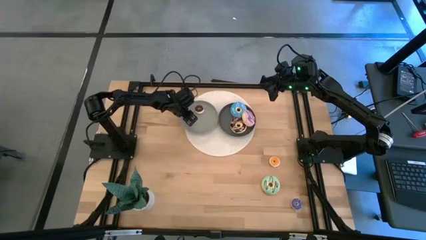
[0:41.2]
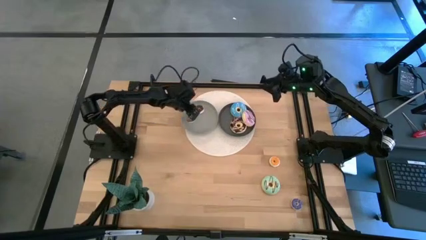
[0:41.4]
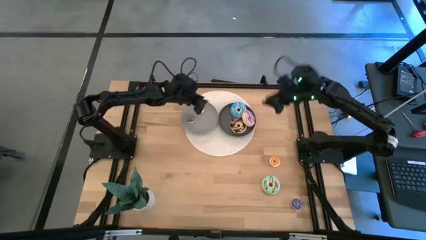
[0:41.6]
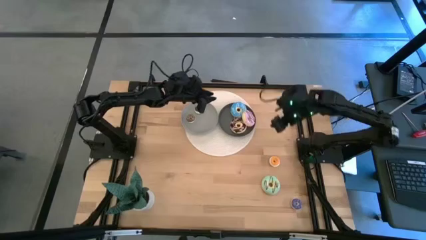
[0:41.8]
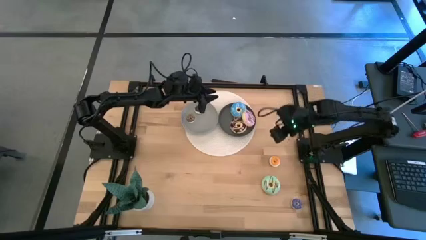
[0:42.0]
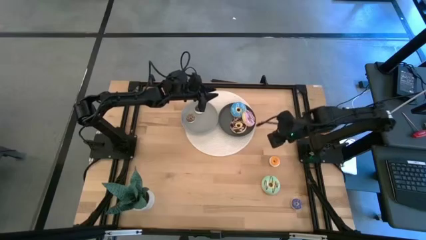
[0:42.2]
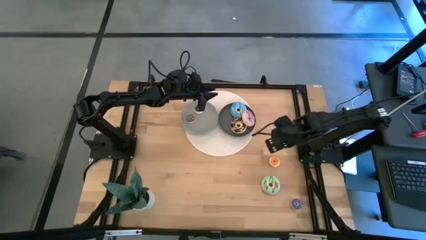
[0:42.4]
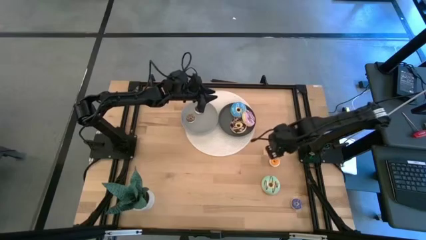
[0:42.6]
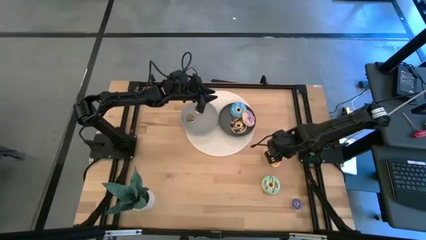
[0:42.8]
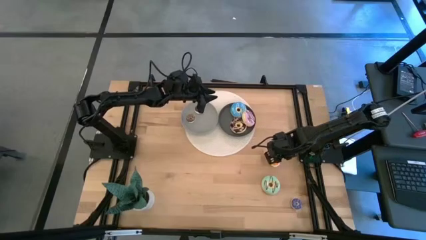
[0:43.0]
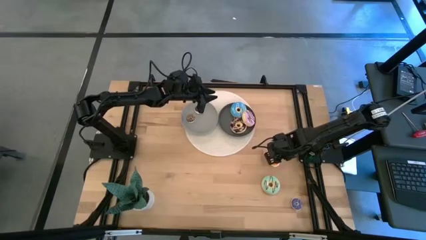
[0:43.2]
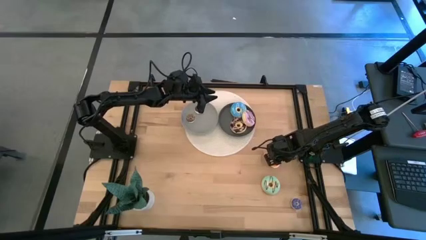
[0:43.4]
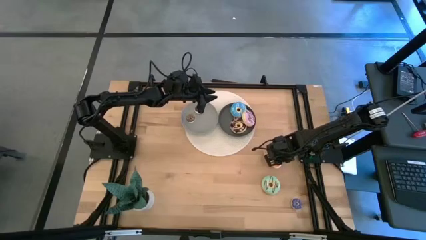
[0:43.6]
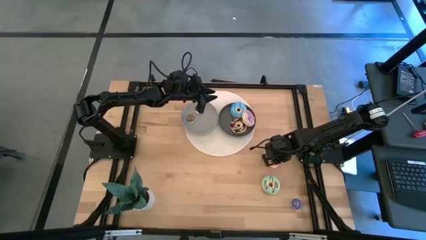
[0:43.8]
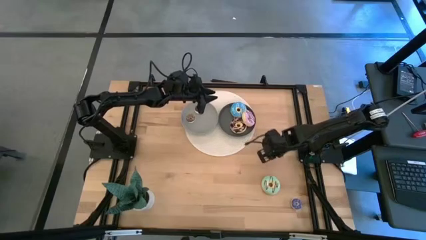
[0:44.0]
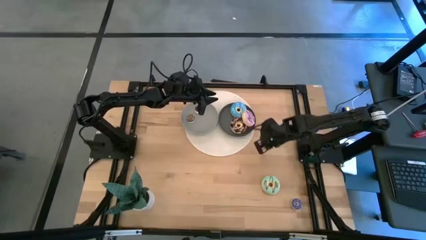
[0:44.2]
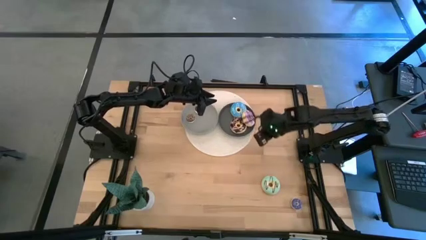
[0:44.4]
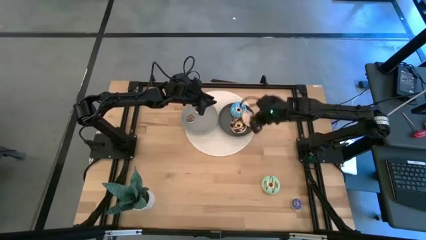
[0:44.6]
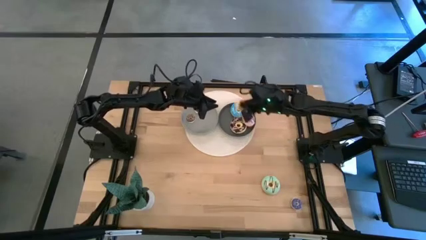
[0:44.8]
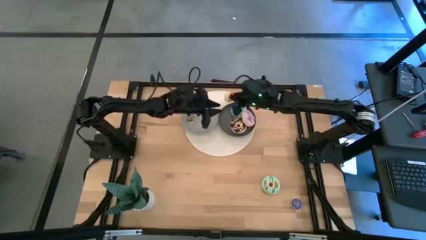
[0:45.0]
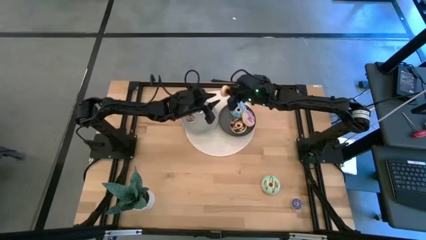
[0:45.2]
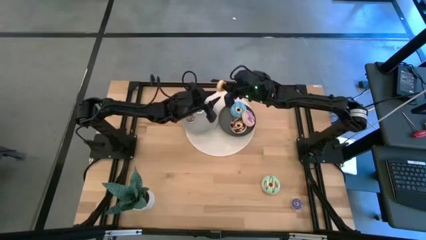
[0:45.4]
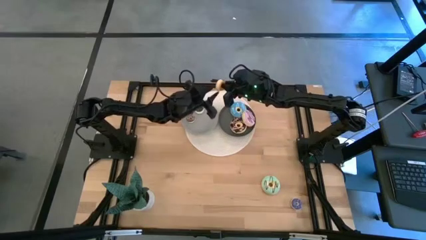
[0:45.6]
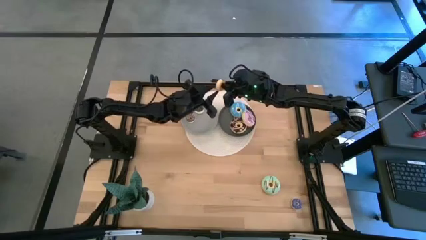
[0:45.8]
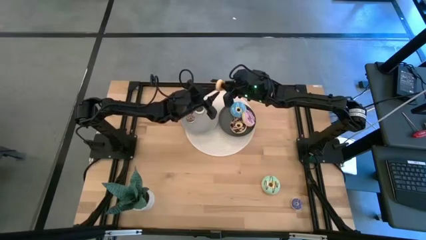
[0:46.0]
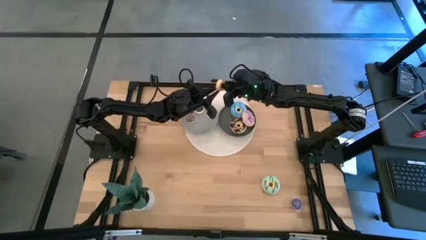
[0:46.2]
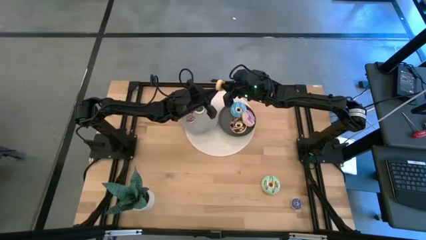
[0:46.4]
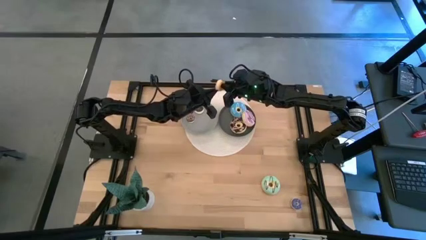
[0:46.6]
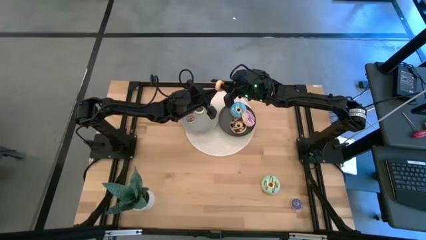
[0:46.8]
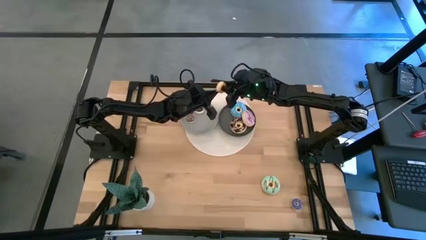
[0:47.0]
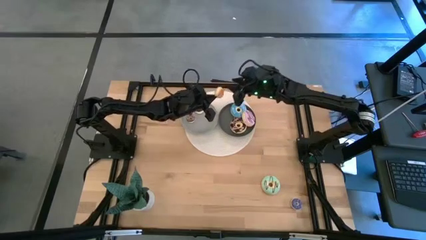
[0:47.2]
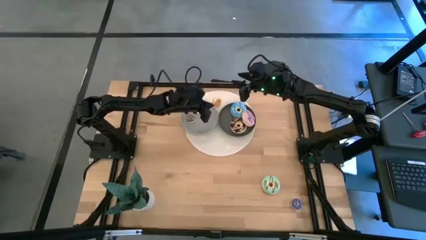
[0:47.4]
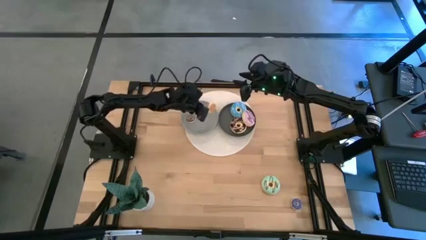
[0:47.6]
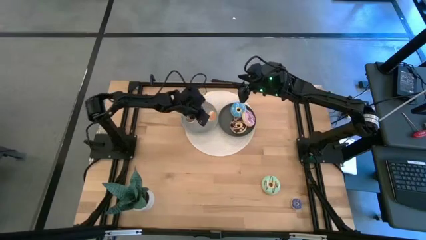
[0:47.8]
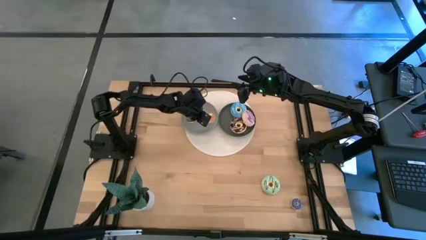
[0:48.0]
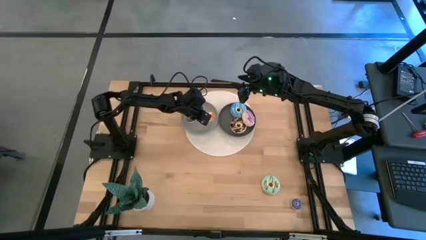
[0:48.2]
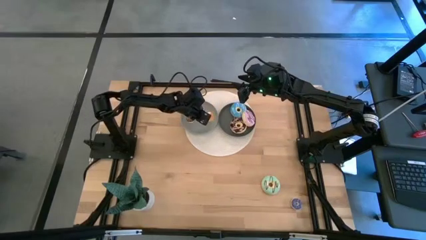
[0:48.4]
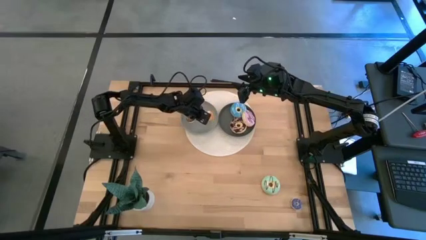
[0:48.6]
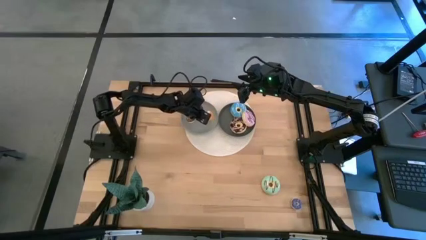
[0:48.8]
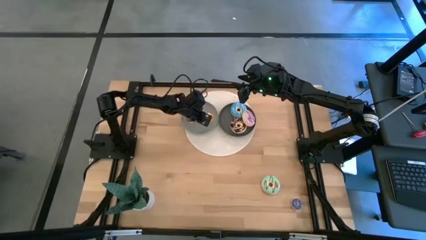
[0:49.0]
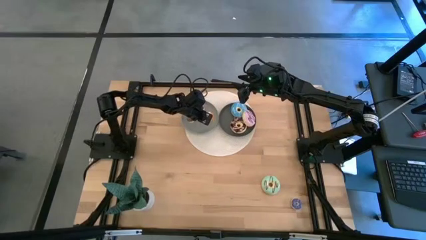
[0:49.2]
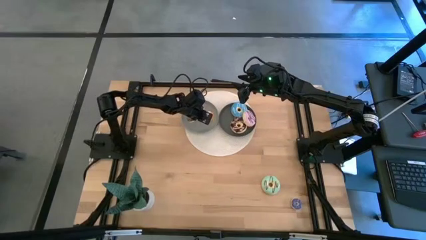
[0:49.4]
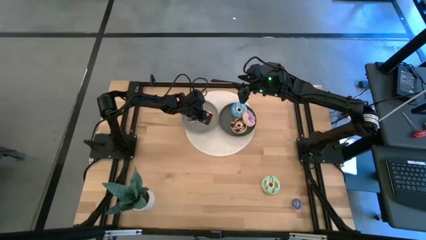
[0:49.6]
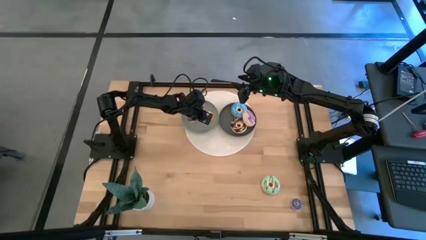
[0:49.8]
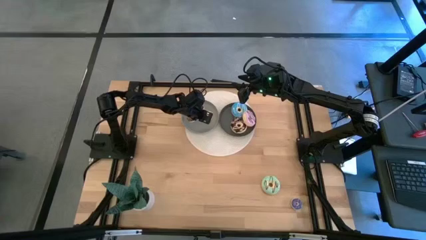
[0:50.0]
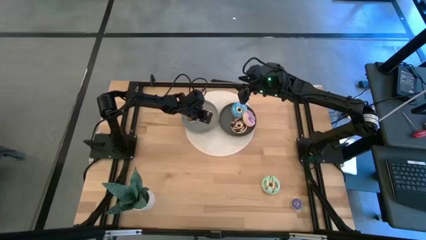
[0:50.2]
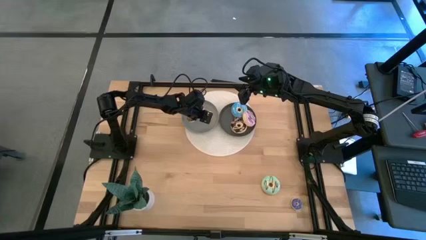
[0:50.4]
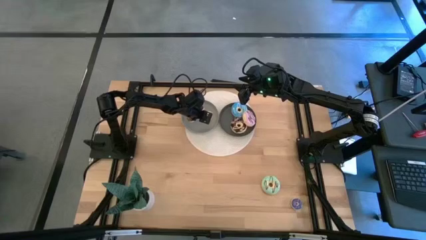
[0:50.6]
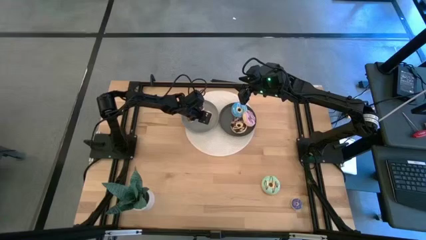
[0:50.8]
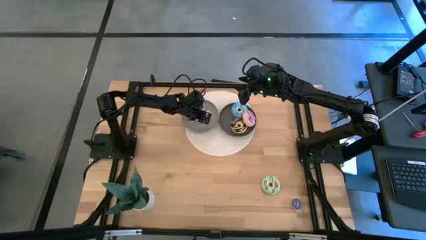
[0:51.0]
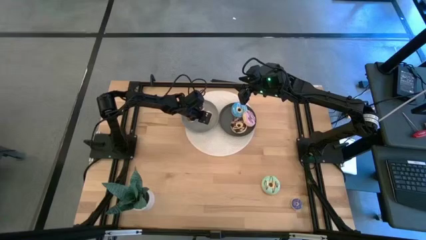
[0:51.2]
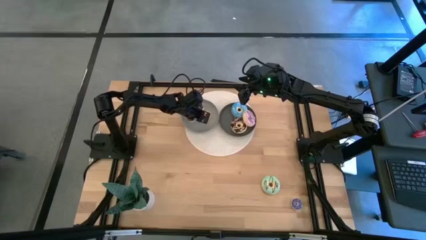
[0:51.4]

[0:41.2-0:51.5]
Task: Pick & Place donuts
Put the small orange donut on the gray plate

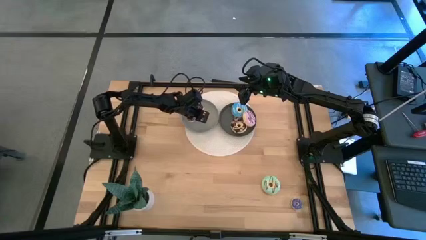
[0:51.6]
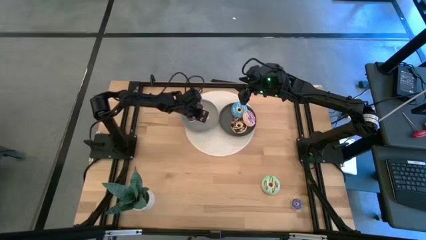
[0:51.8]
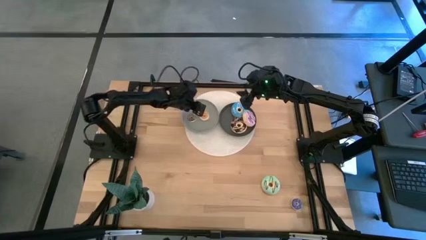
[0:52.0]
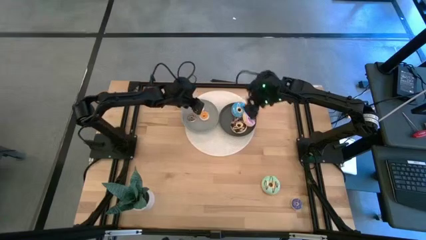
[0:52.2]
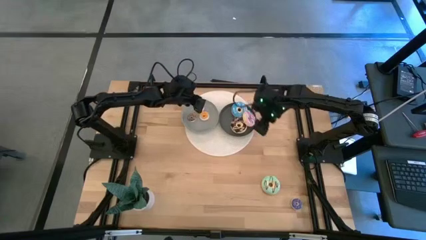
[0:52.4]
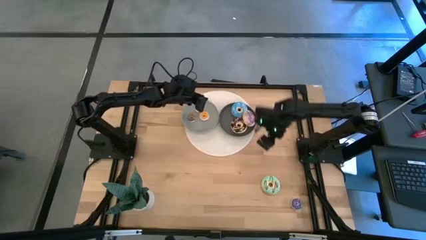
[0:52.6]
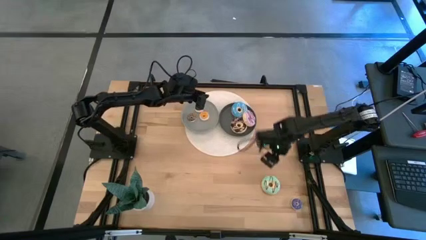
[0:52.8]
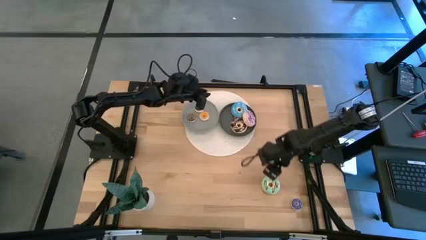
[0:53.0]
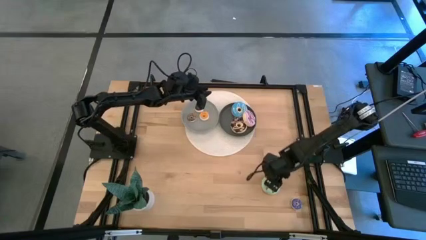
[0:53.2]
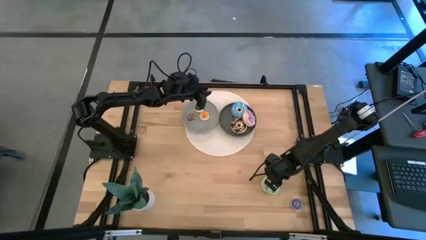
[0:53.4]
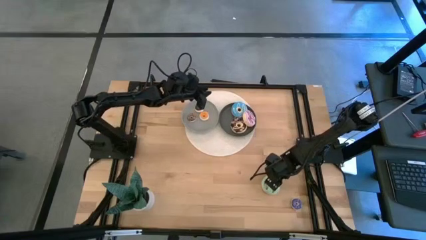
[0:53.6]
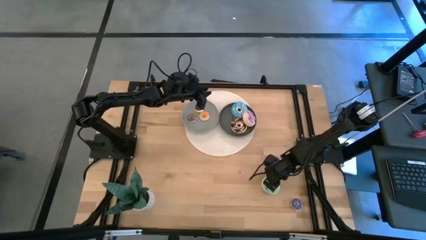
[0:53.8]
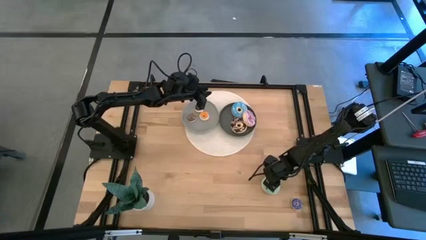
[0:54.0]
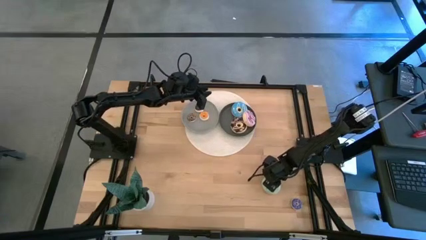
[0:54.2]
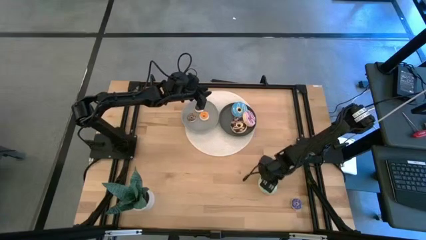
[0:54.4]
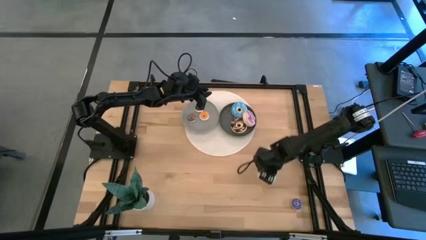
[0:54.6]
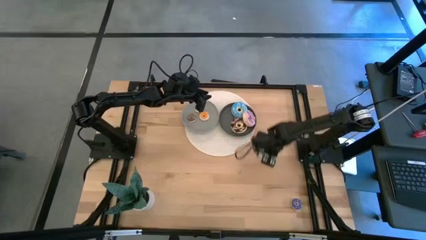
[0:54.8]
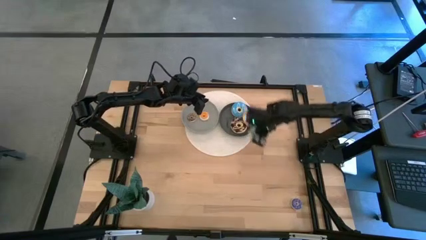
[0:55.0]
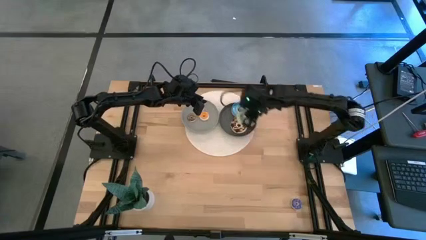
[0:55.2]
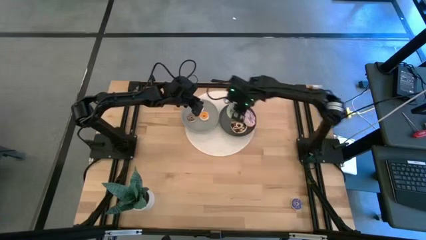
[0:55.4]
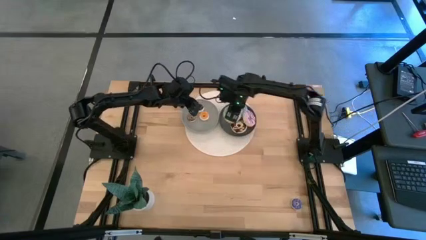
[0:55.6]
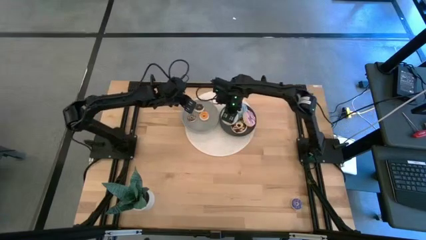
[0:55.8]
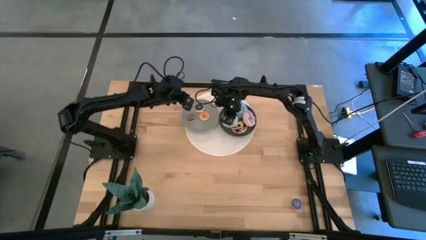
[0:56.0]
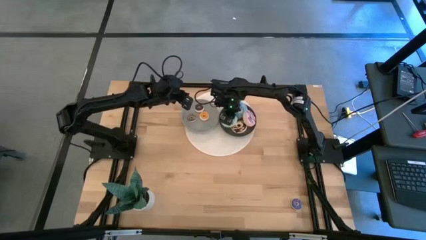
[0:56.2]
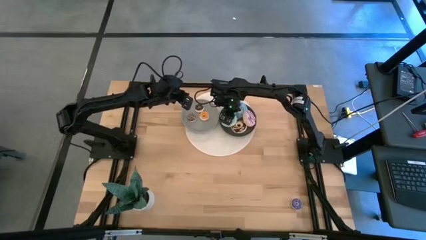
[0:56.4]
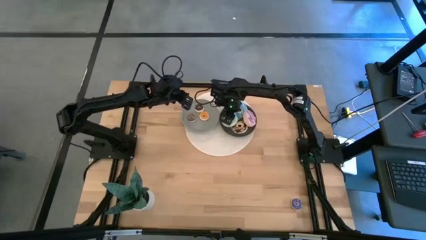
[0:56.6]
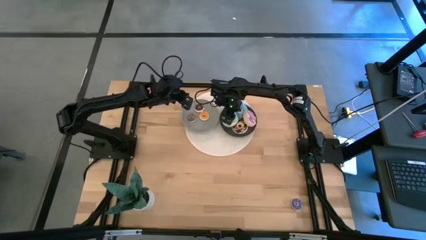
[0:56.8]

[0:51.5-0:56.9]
Put the large light green donut on the dark gray plate

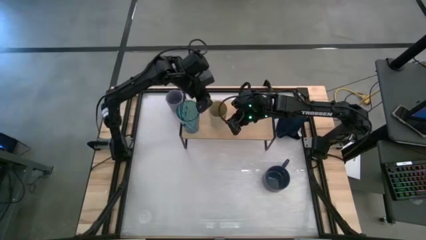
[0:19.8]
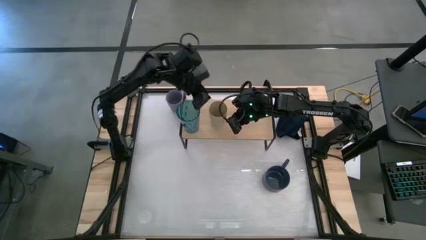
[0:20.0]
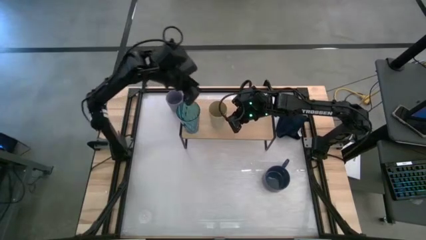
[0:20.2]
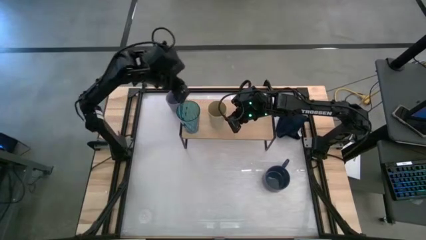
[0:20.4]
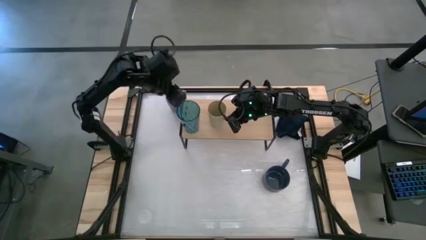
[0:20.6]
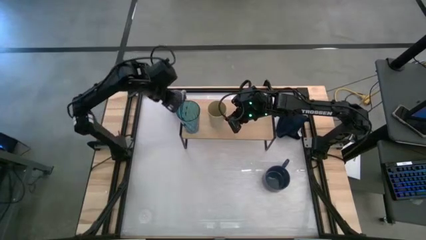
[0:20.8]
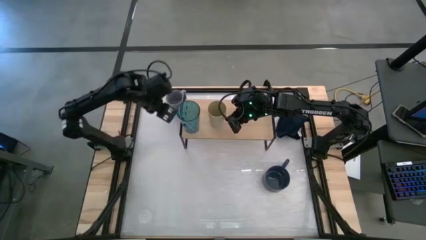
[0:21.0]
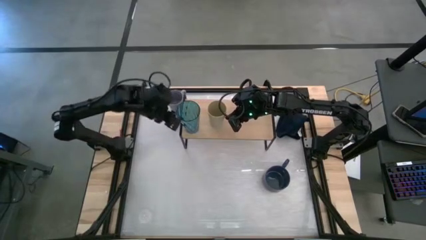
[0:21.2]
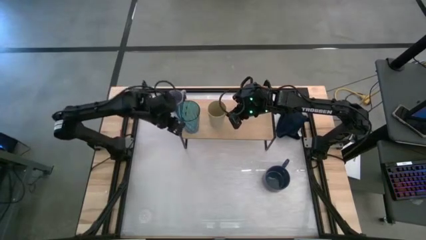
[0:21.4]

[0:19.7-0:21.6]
Task: Stack small to large cups/mugs on shelf
Adjust the blue glass

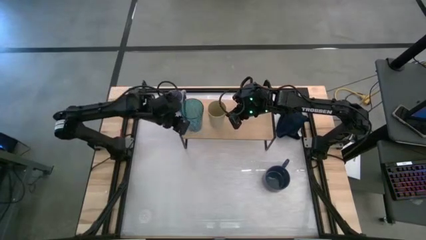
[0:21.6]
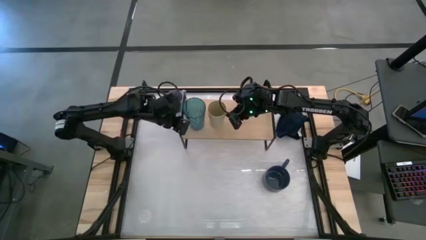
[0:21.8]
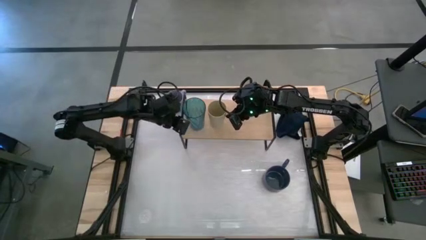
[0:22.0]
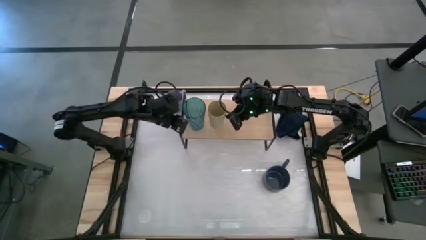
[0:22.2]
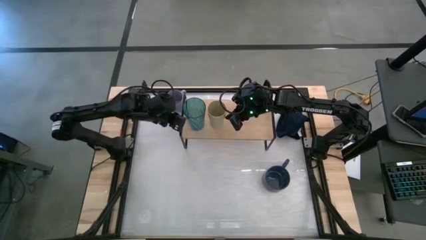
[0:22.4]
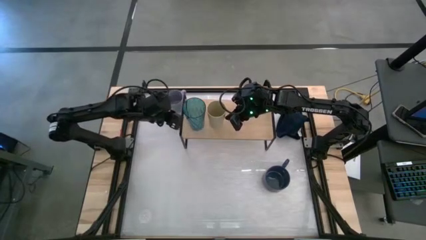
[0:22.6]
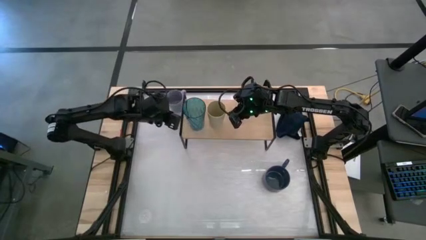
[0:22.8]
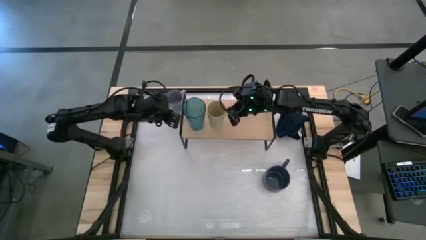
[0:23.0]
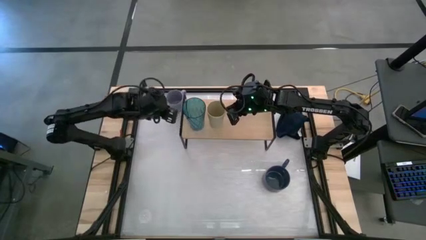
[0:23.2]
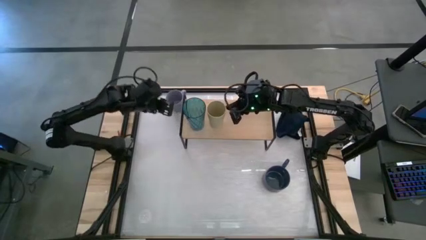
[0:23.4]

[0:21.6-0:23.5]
Adjust the brown cup
